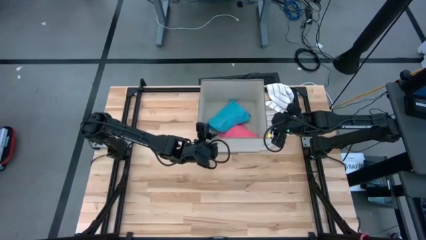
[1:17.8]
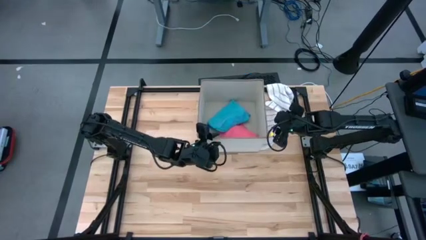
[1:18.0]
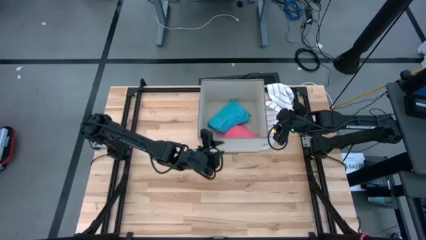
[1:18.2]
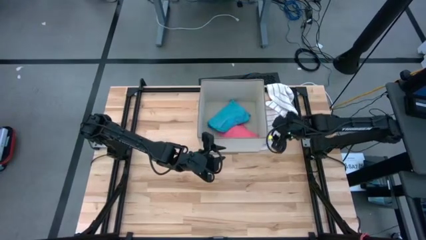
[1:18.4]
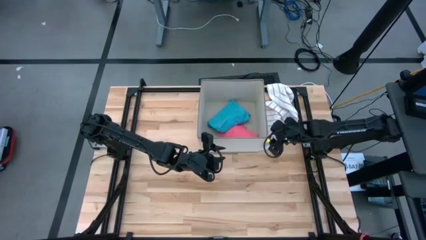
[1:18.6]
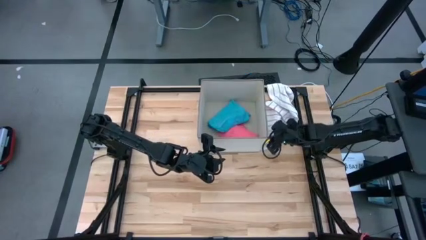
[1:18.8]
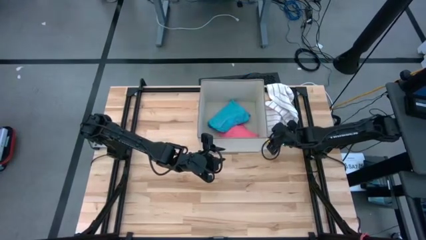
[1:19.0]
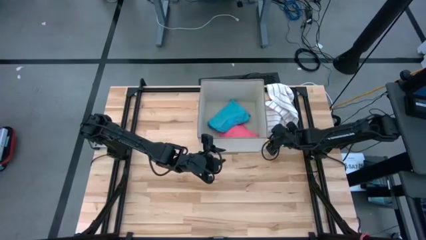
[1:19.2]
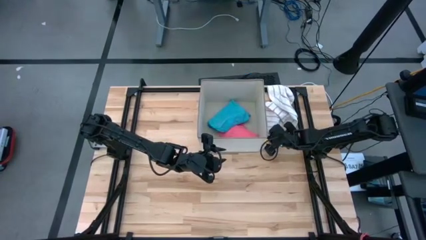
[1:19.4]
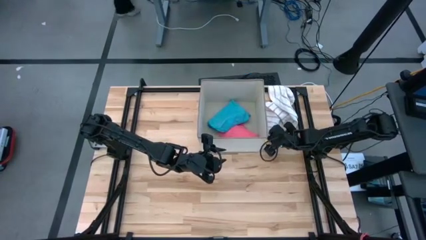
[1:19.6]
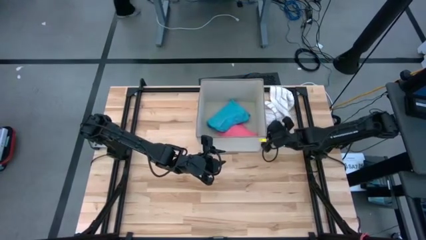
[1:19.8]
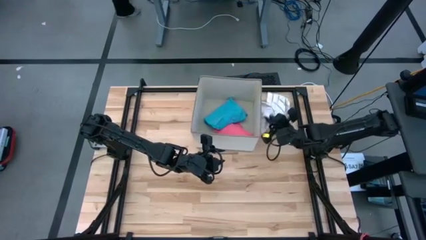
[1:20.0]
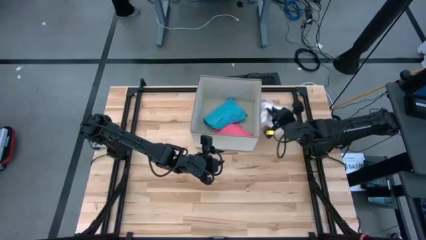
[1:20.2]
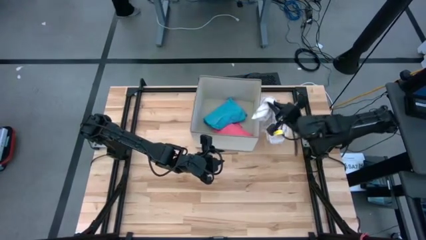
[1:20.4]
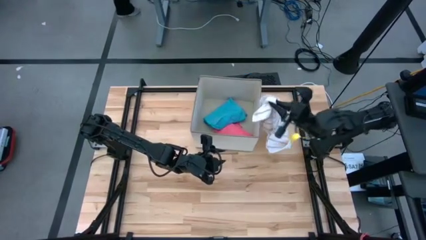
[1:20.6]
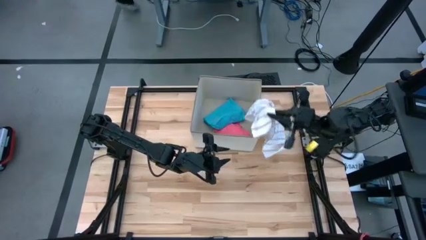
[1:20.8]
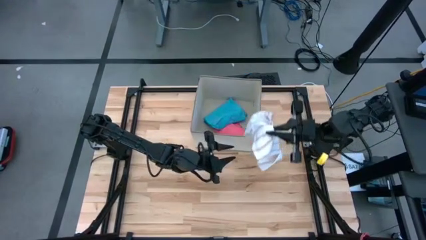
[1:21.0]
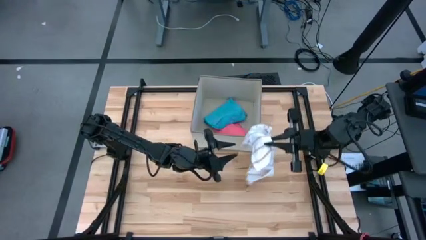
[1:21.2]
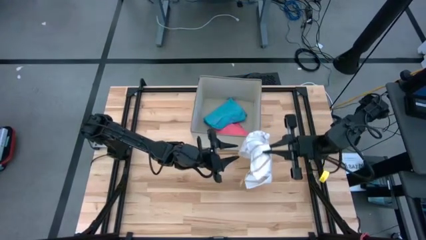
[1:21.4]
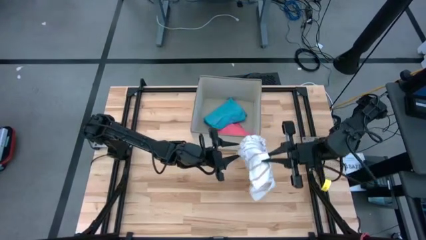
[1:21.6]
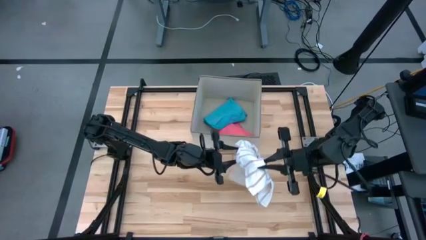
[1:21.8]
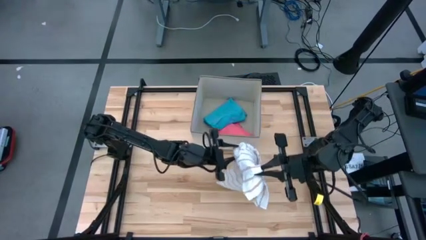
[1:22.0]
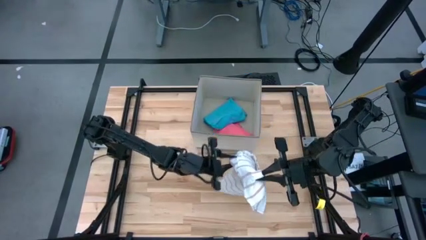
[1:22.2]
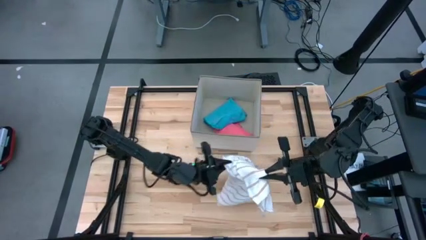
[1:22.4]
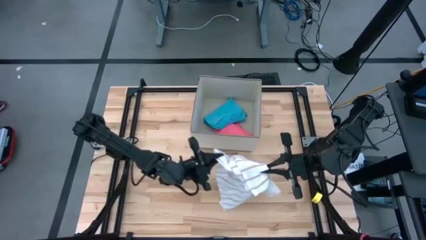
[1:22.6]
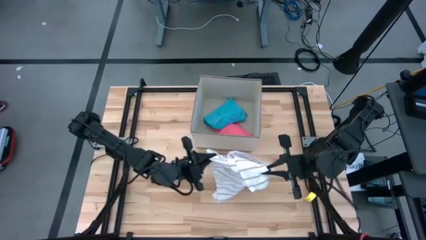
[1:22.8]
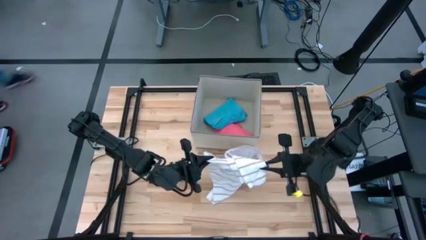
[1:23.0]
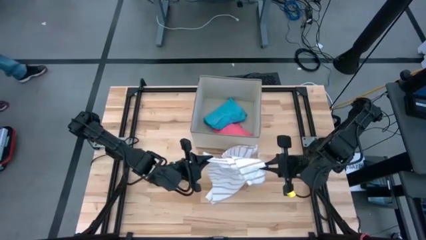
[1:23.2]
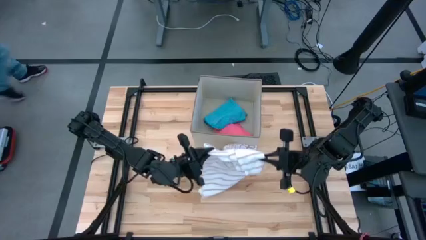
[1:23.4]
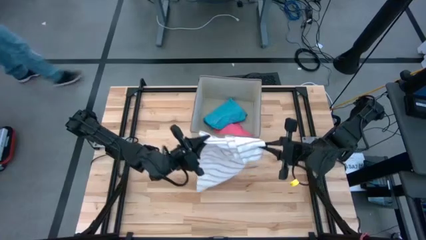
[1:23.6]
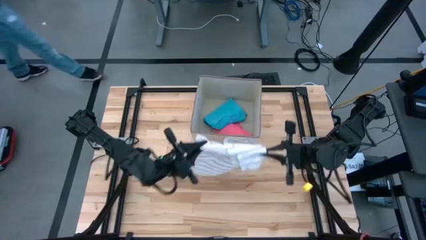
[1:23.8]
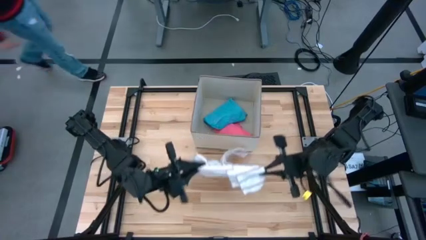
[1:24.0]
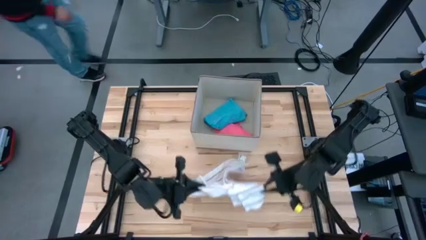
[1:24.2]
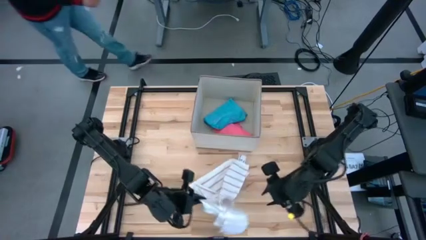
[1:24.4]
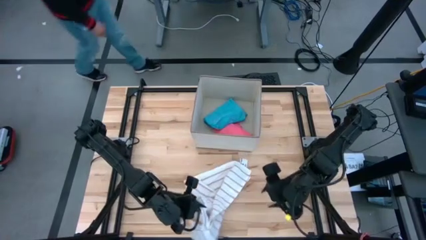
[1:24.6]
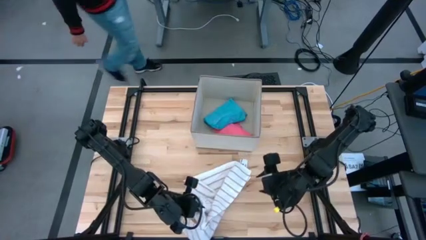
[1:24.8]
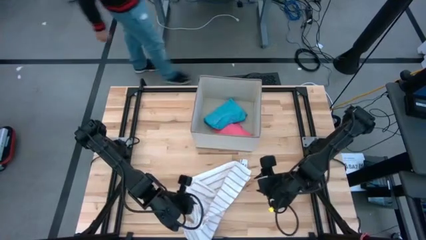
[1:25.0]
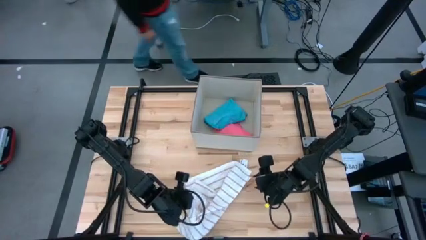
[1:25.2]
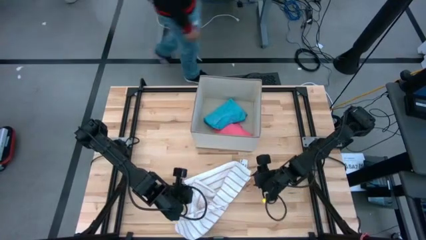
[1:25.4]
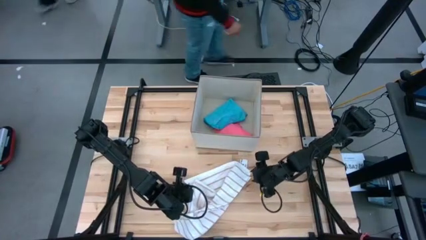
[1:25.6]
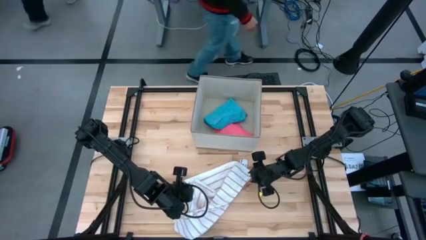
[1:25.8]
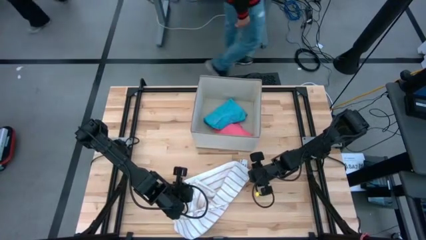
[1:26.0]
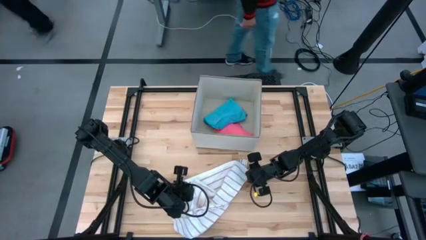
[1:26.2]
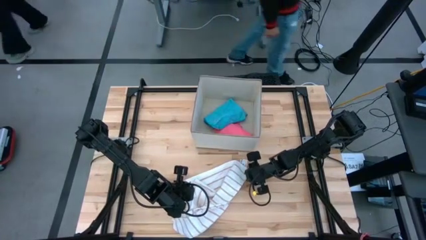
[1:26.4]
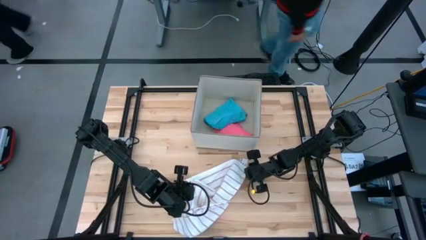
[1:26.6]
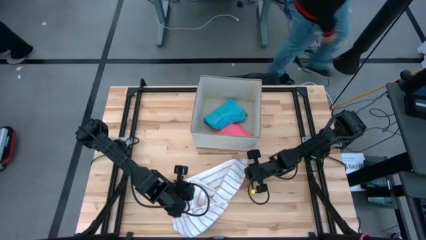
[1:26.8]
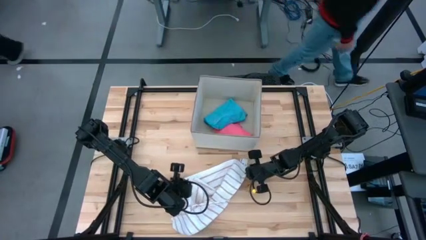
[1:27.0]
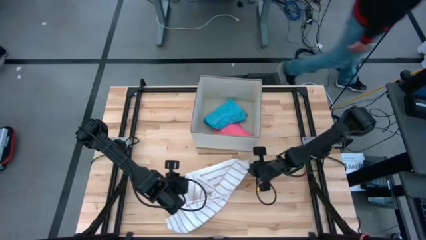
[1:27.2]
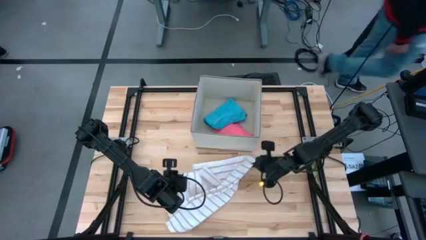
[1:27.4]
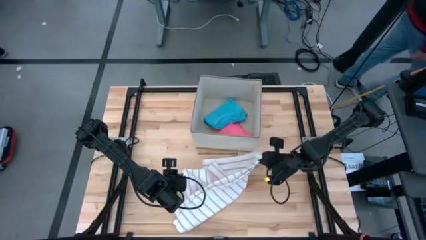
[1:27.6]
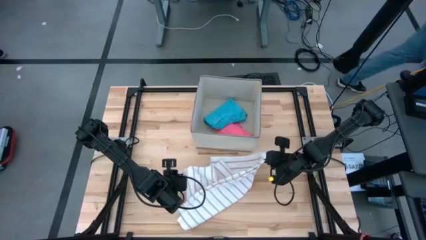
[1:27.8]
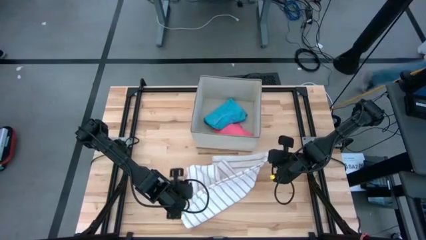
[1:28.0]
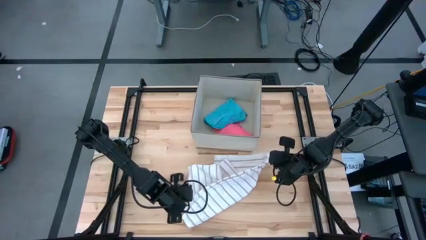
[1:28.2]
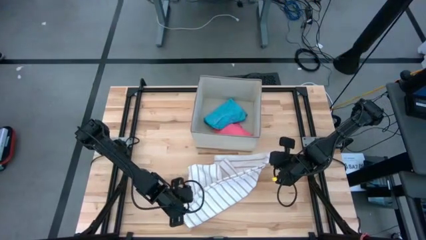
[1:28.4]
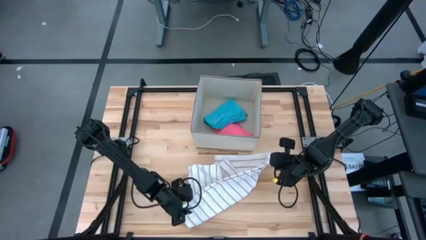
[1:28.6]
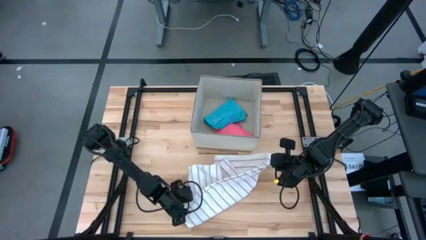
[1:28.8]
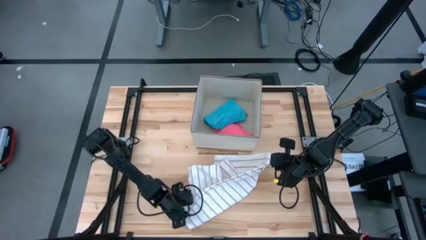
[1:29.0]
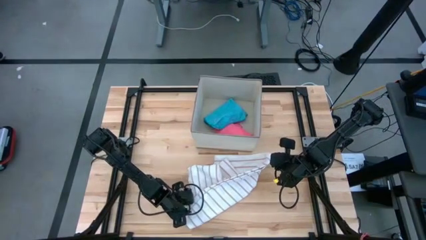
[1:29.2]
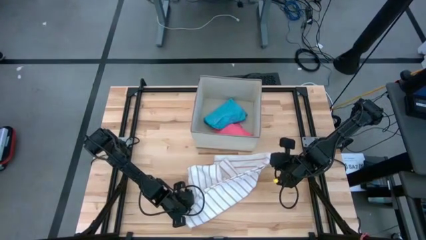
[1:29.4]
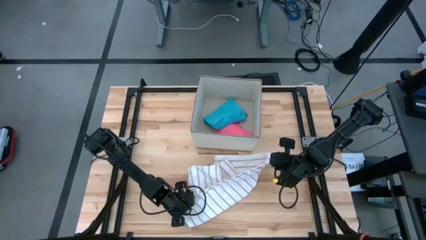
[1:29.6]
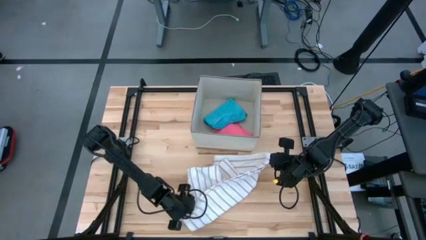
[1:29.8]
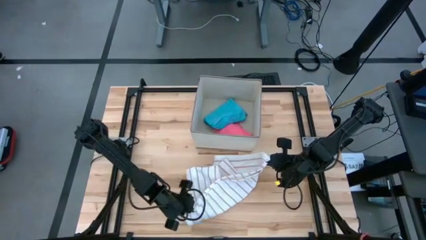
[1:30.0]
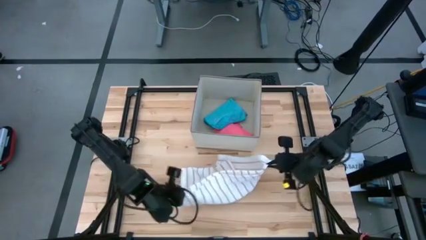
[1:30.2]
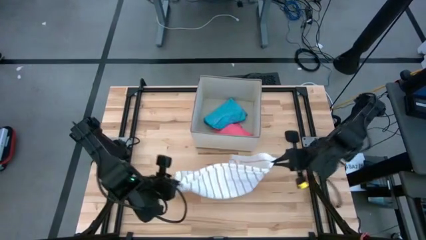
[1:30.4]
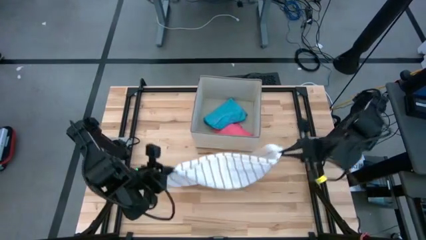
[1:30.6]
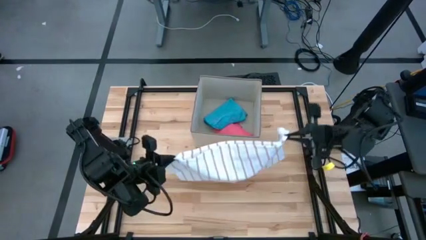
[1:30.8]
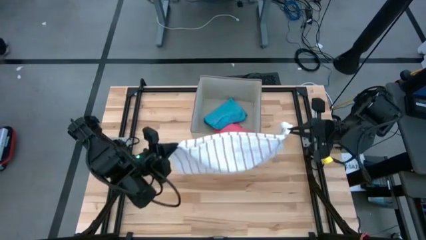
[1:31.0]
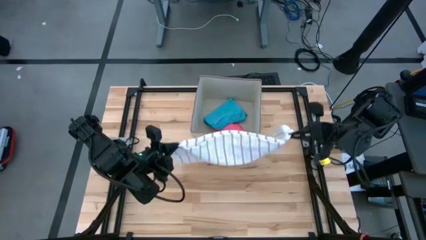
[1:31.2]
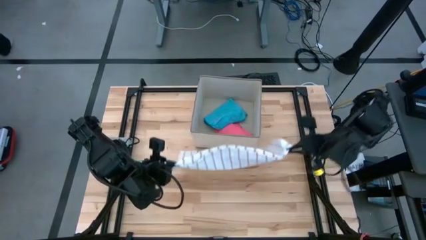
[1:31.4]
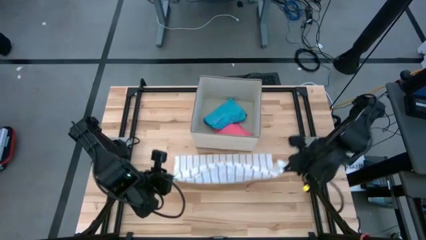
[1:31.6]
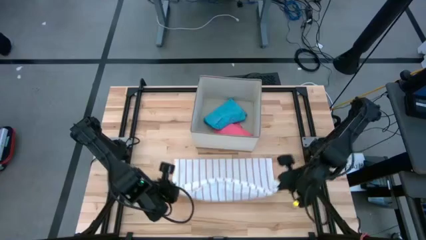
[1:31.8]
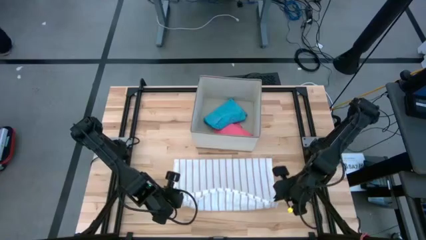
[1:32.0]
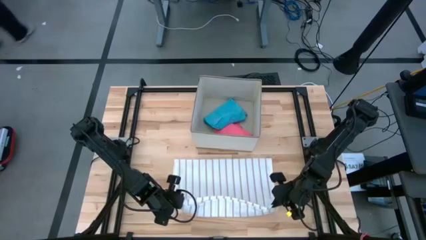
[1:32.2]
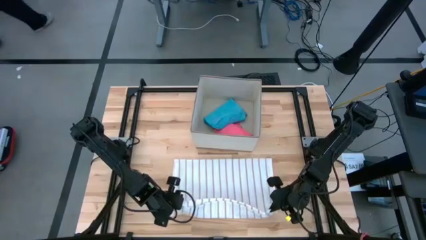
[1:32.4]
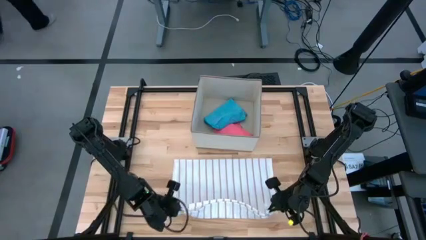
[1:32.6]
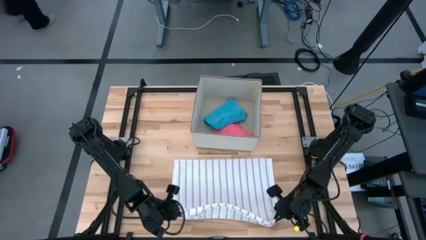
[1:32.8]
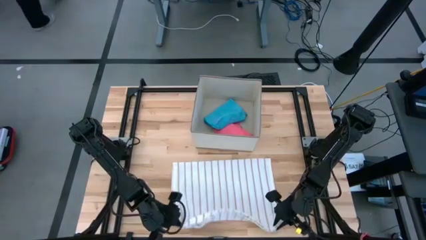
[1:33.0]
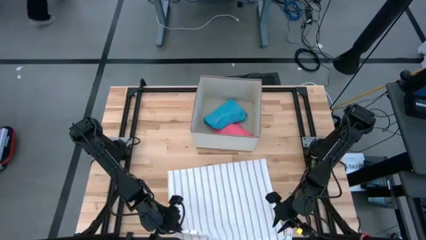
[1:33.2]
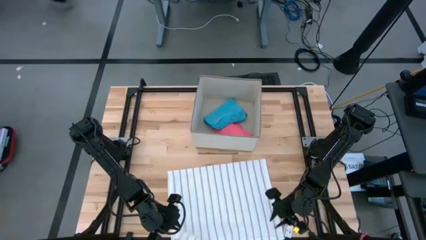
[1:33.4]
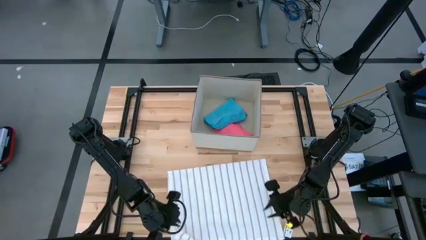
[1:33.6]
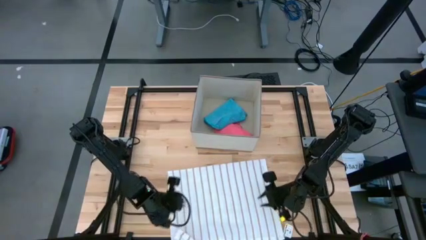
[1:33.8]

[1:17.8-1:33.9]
Task: Fold towel
Fold the white towel
